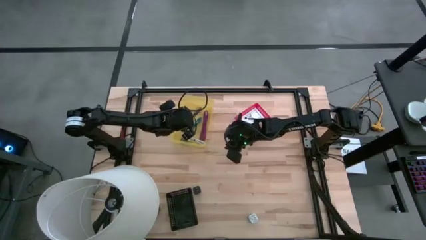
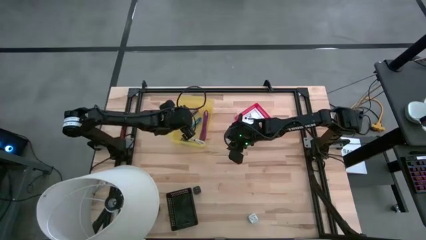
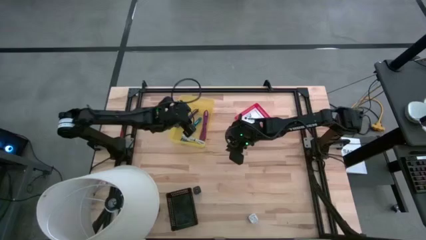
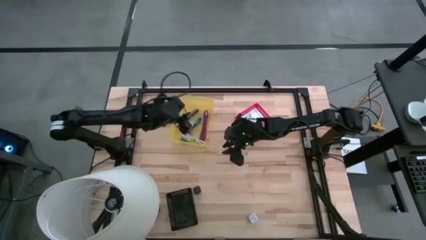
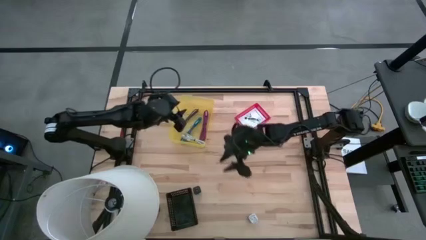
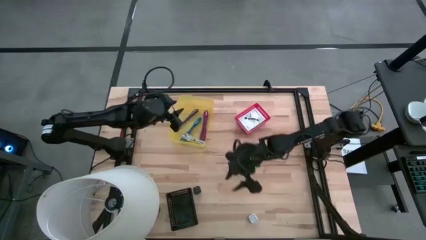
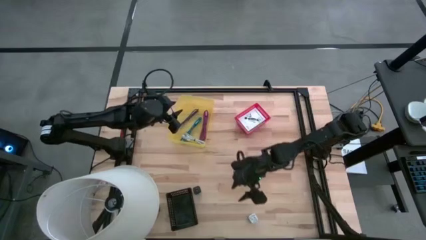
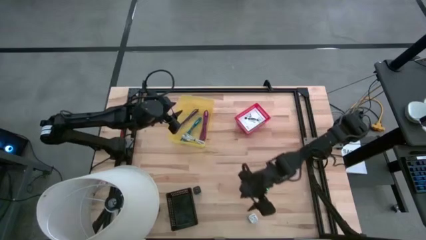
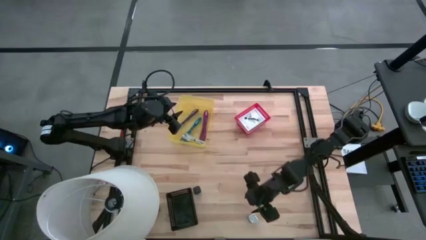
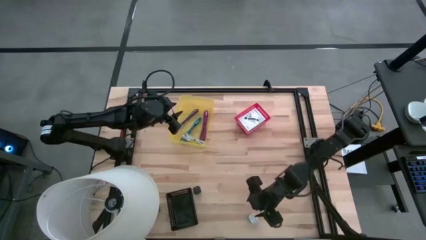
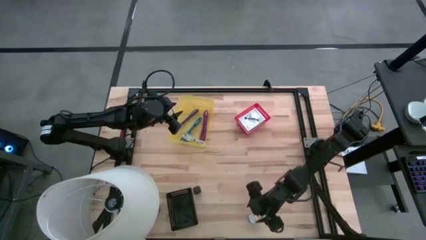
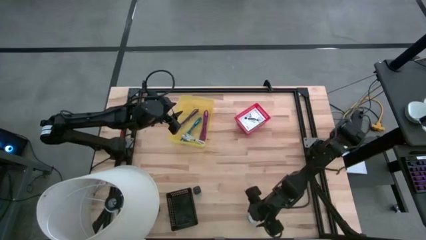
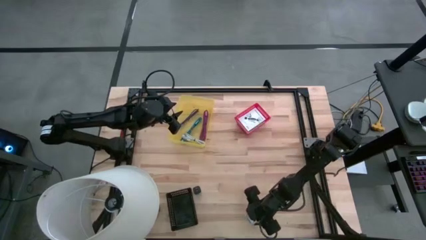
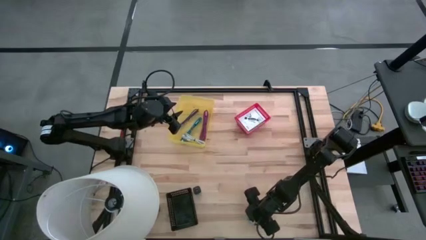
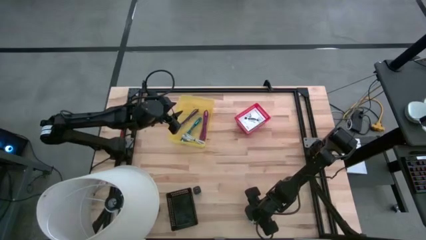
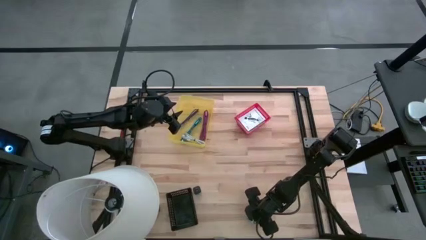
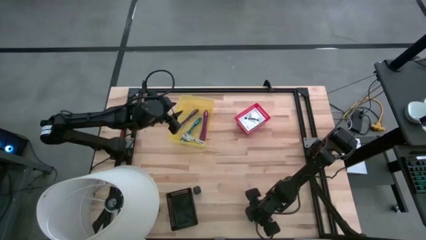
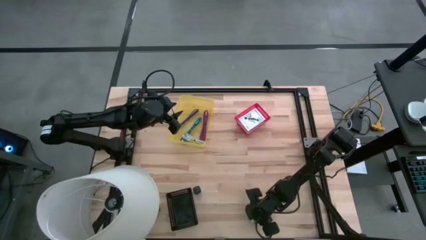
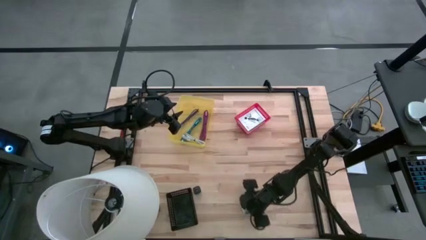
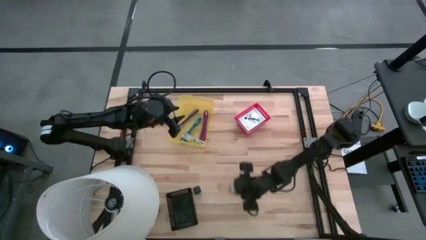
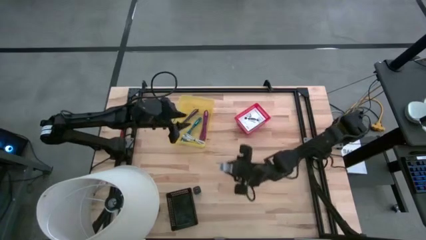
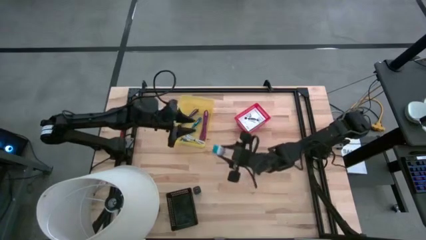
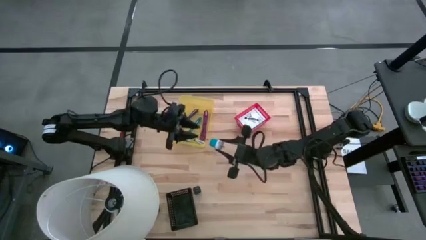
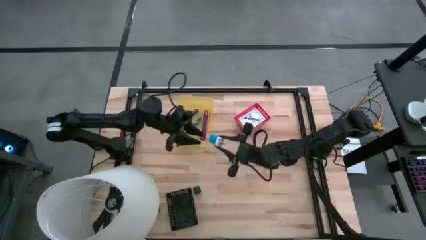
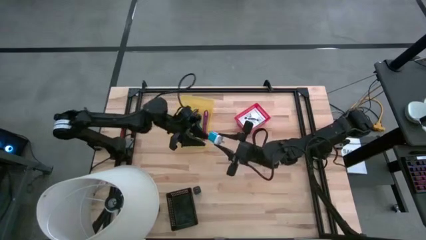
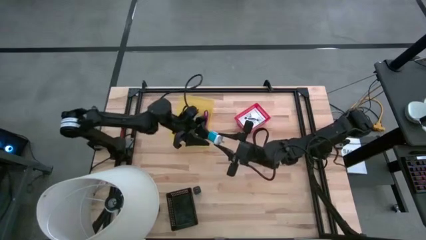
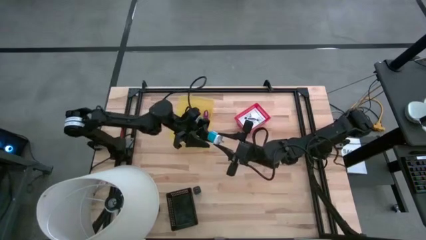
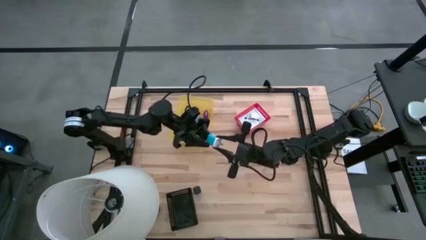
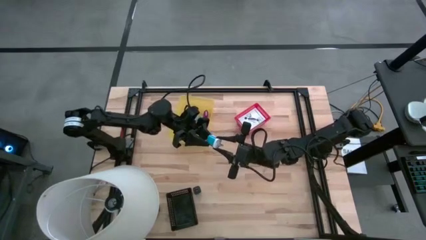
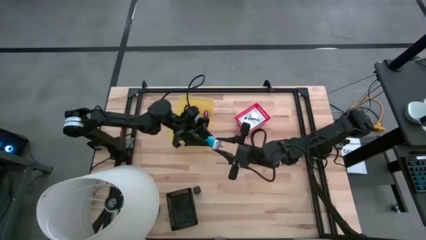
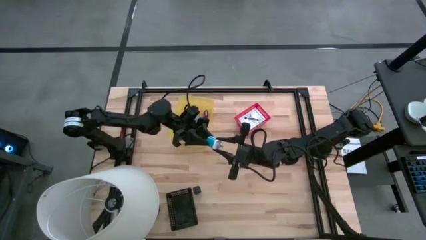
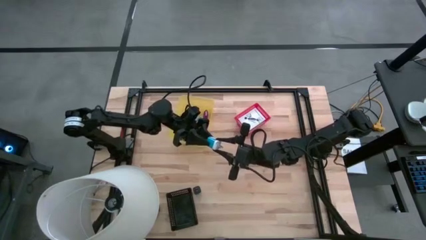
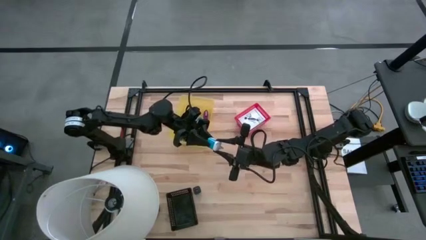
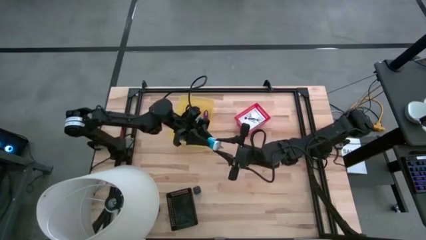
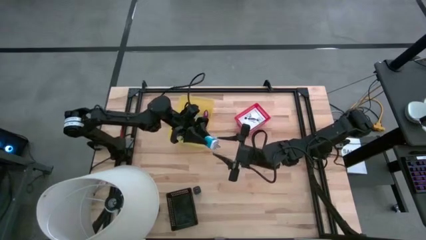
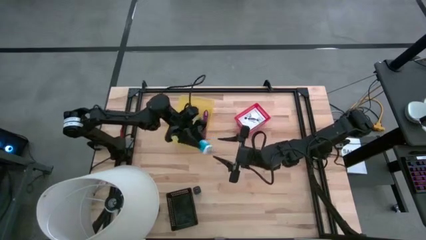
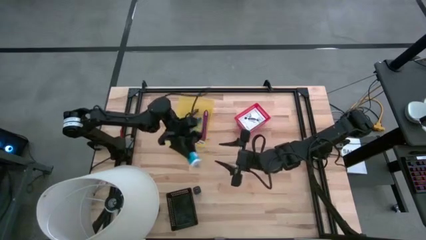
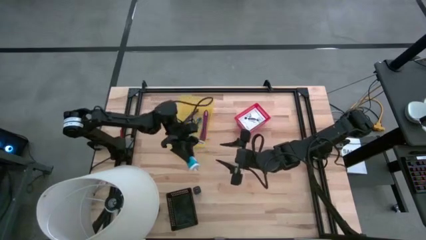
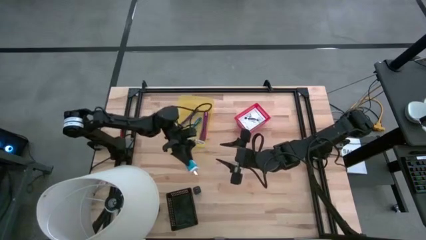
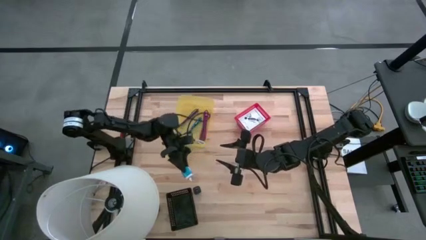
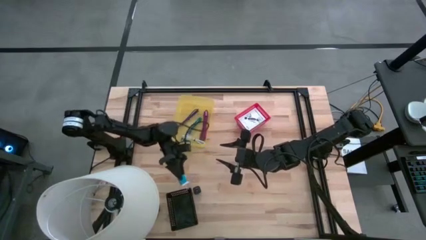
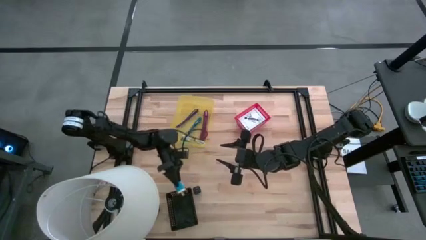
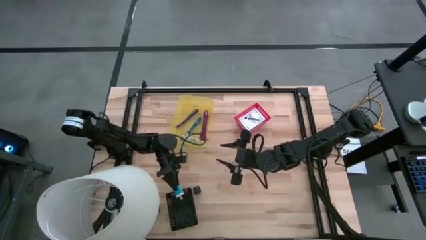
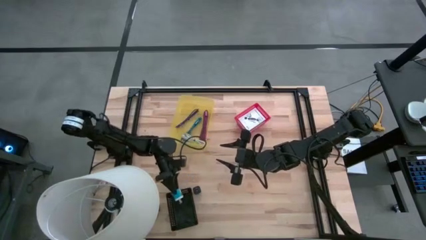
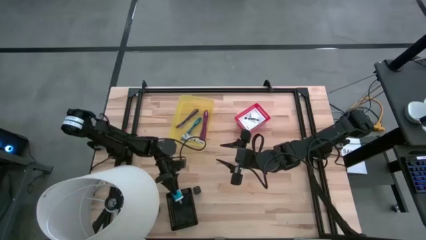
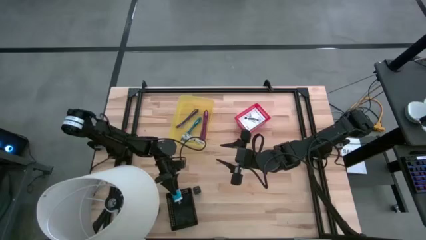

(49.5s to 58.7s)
Task: Pick and place items into bin
Put the blue charger adapter into the black basket

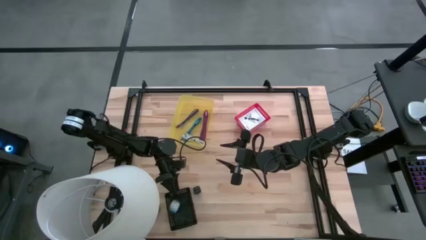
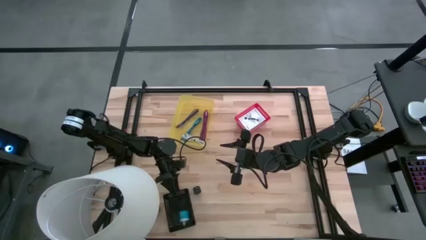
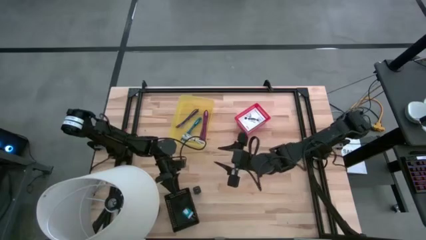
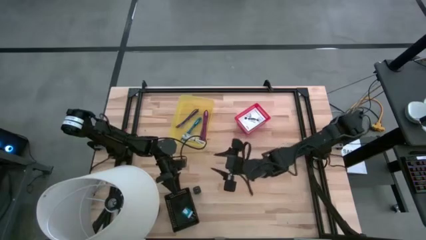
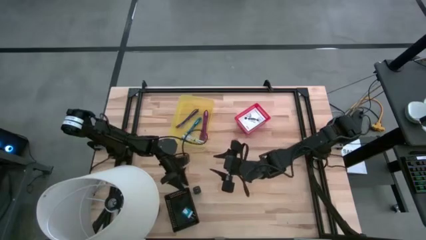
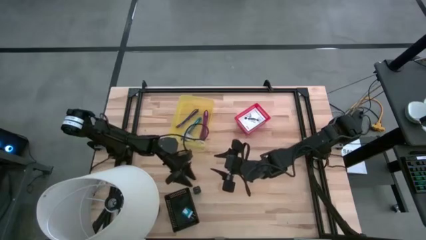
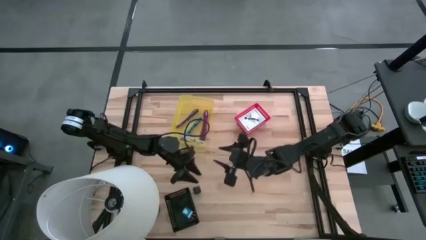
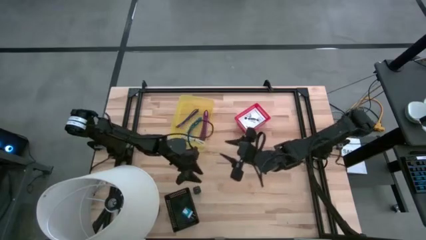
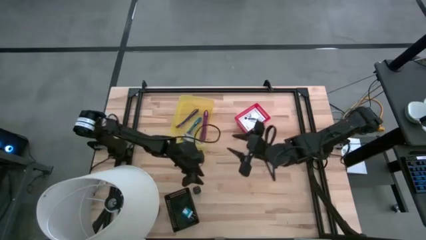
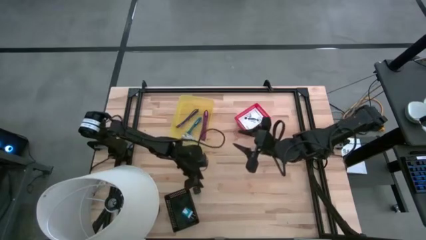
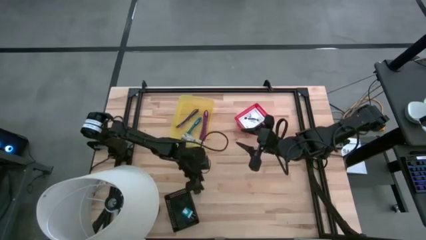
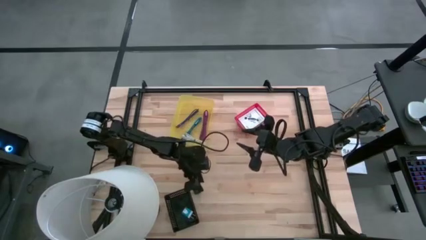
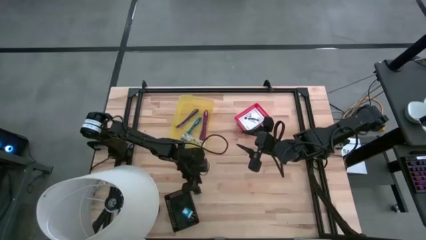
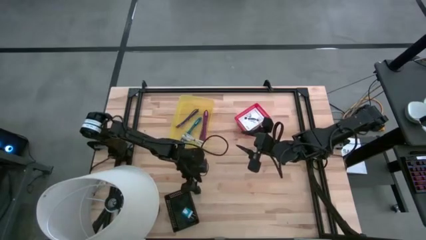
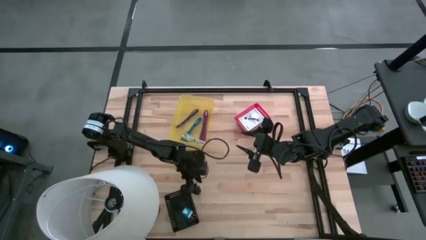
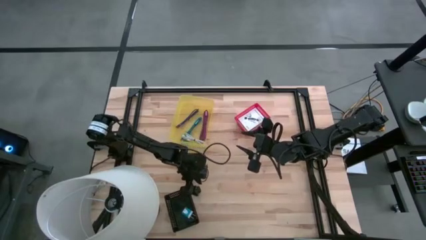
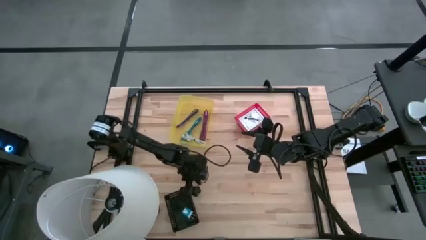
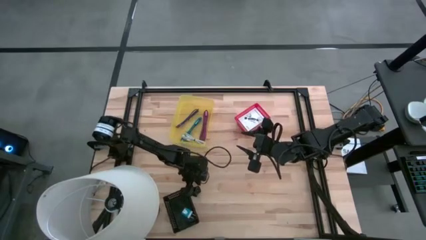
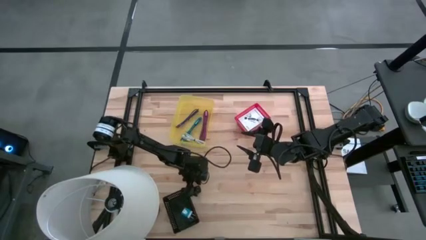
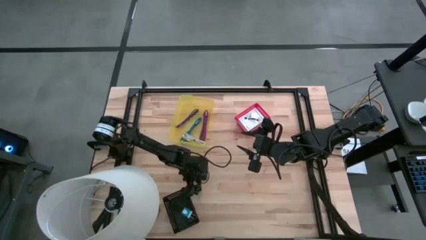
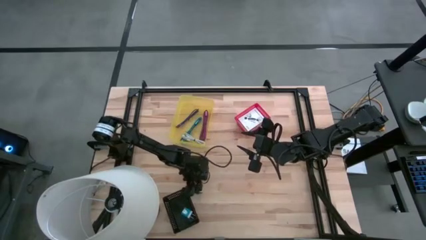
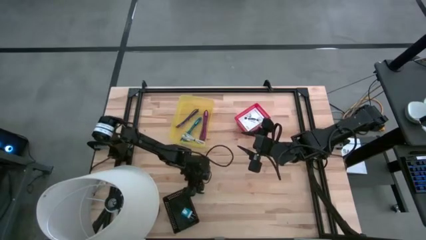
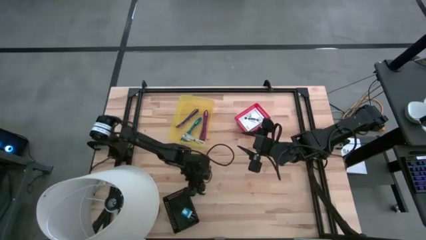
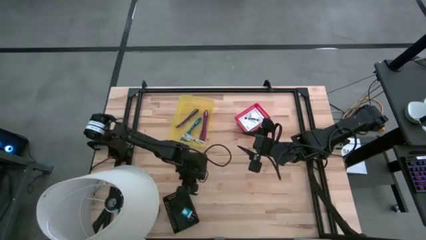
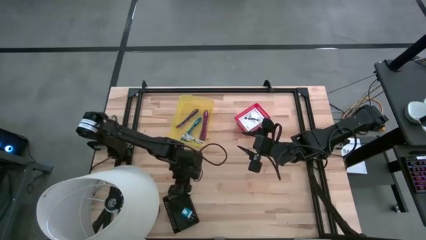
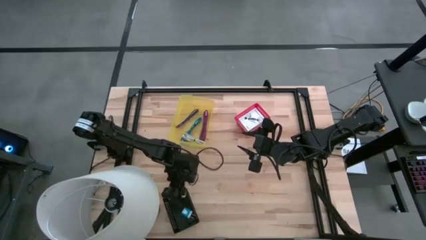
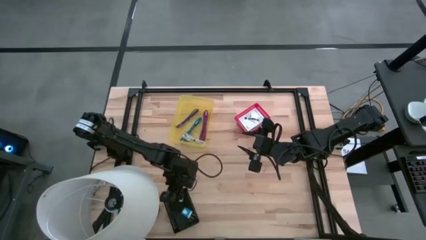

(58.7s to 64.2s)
Put the black charger adapter into the black basket

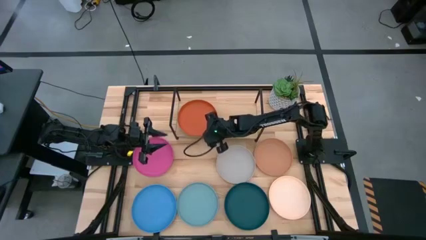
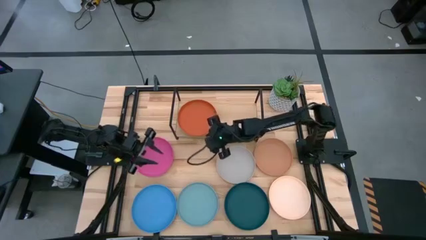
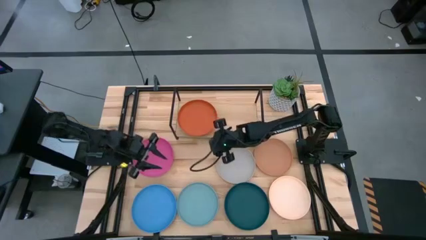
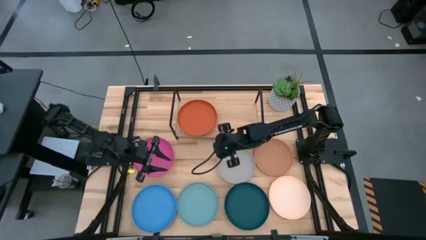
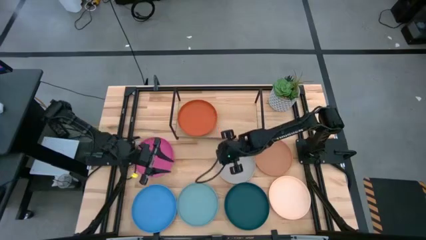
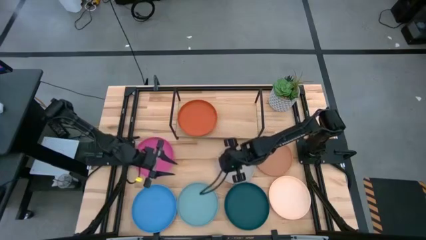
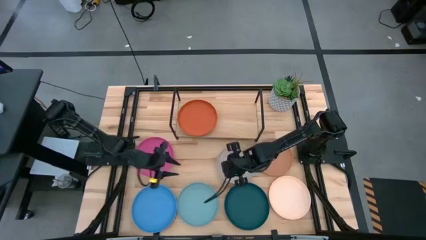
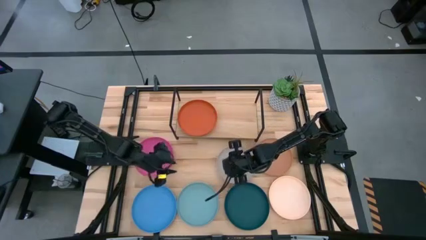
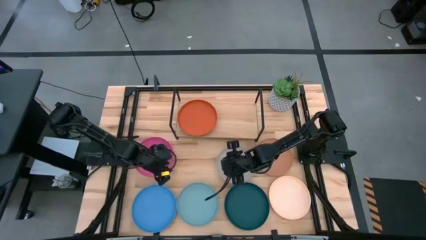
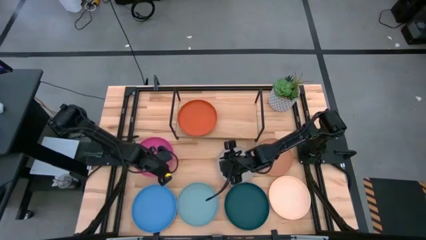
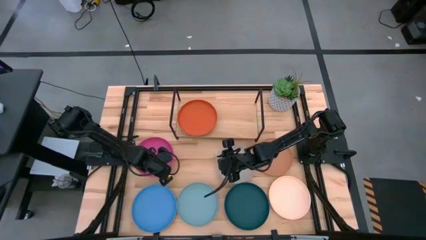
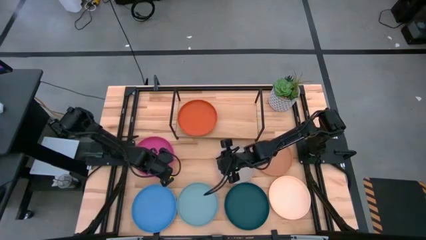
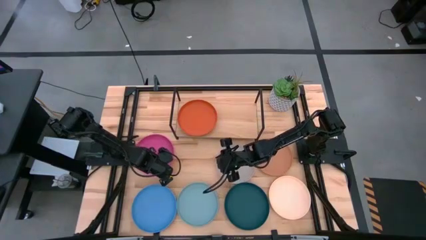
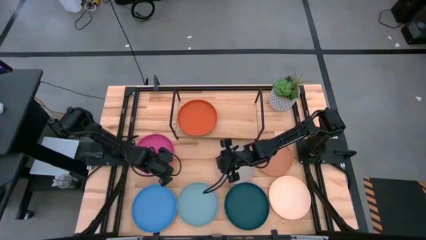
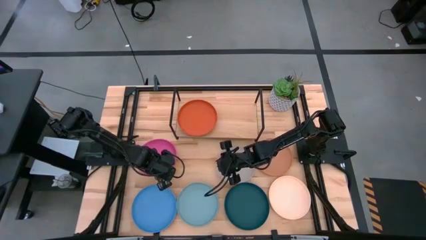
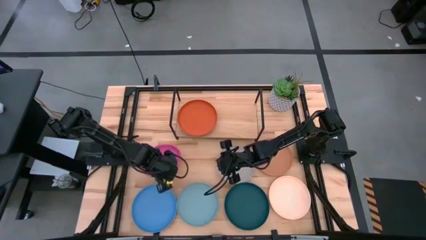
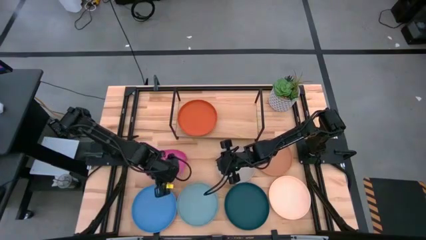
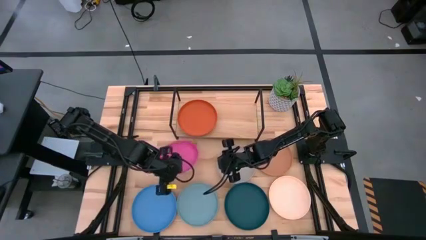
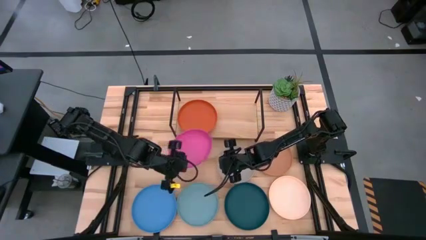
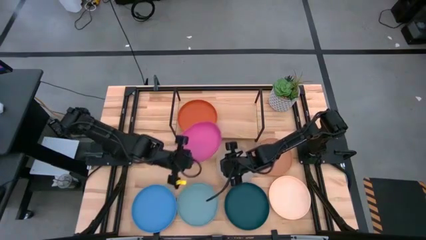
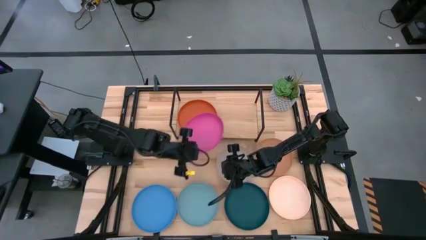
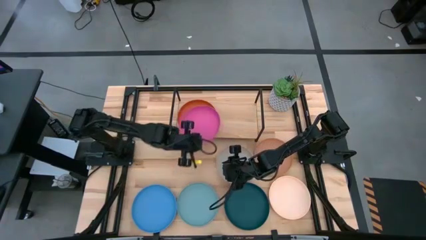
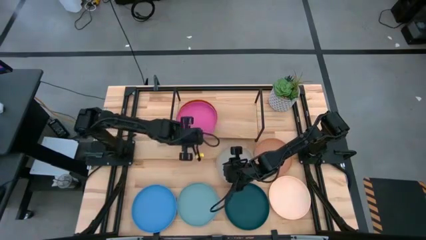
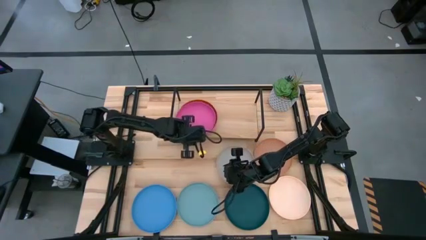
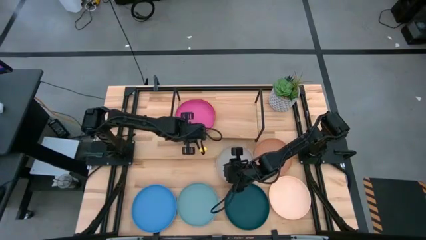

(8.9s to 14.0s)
Task: Place and stack plates onto a shelf
Stack the pink plate on the orange plate
